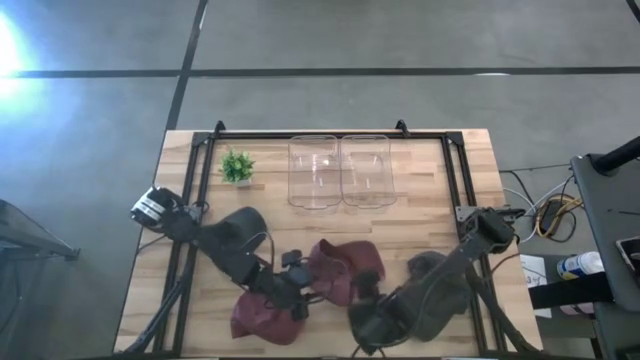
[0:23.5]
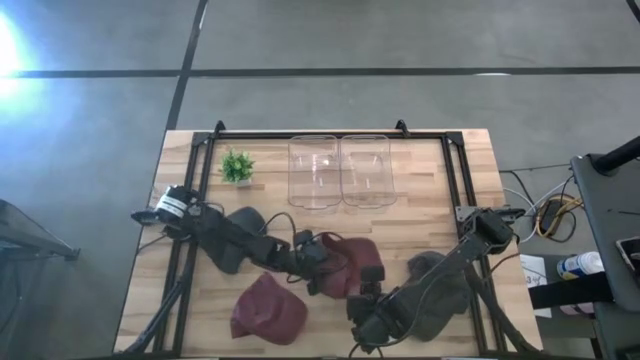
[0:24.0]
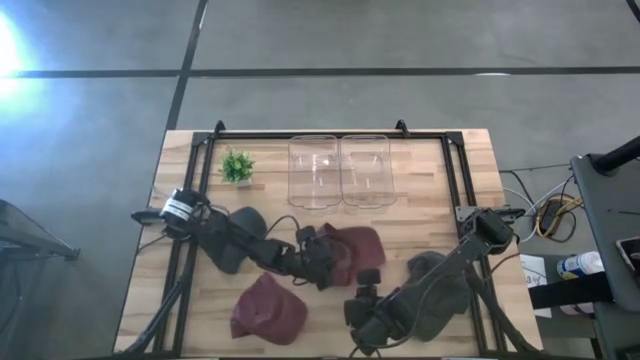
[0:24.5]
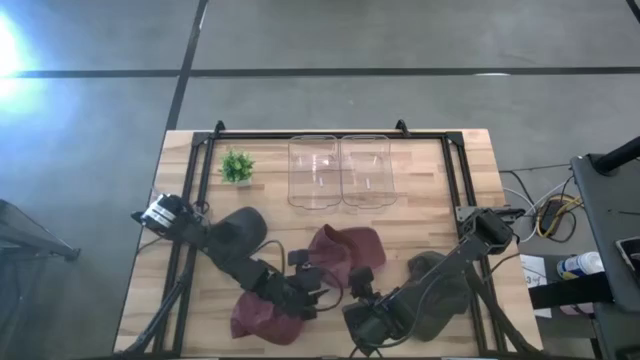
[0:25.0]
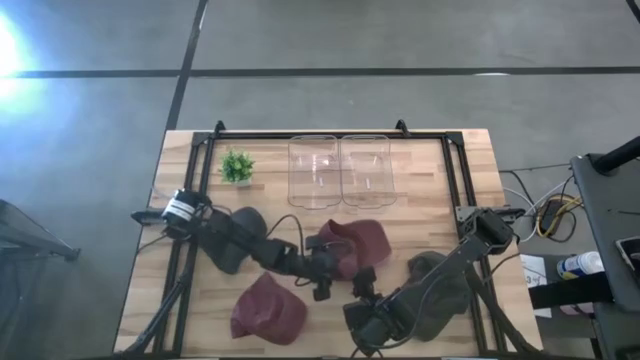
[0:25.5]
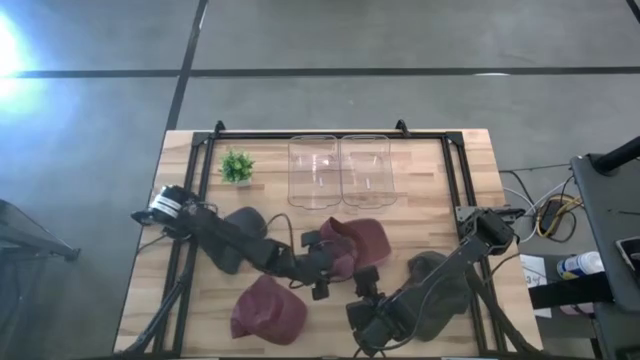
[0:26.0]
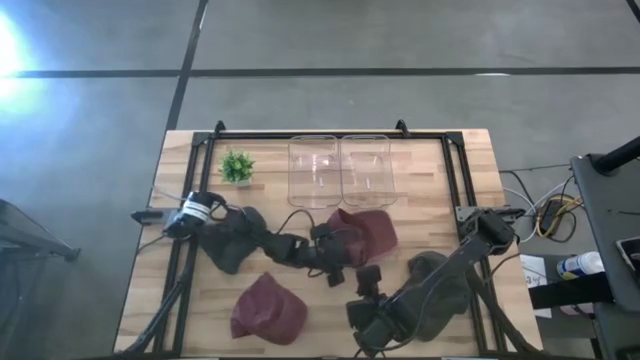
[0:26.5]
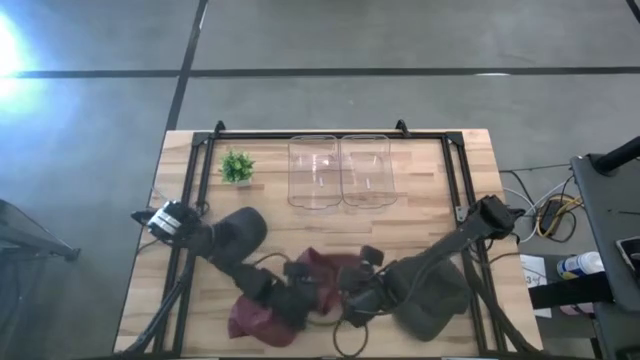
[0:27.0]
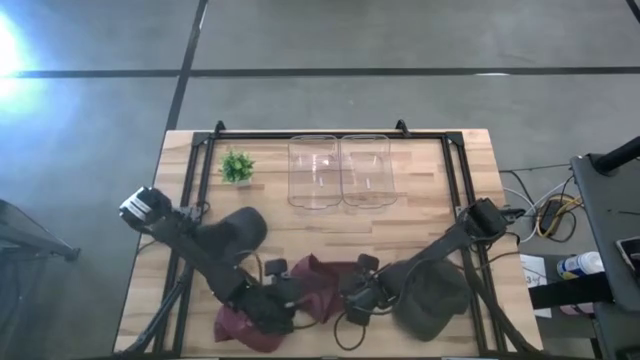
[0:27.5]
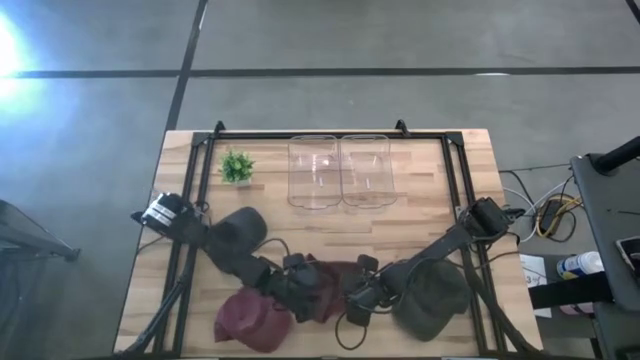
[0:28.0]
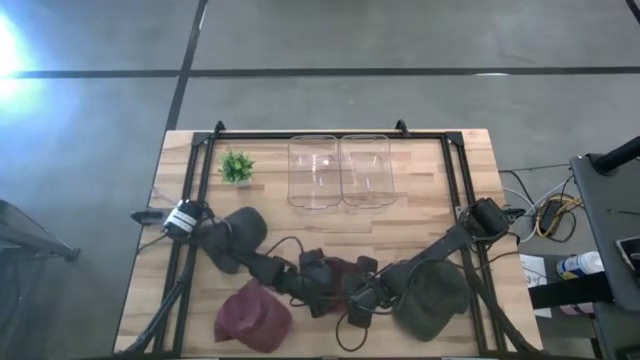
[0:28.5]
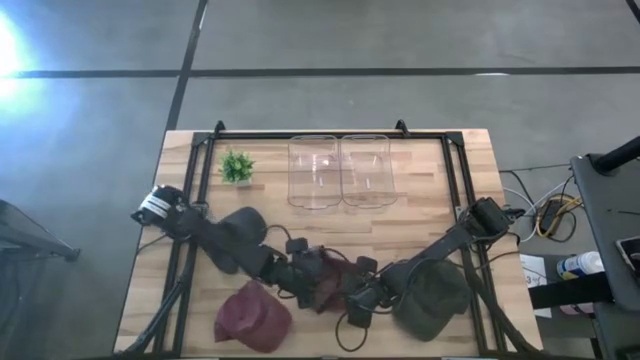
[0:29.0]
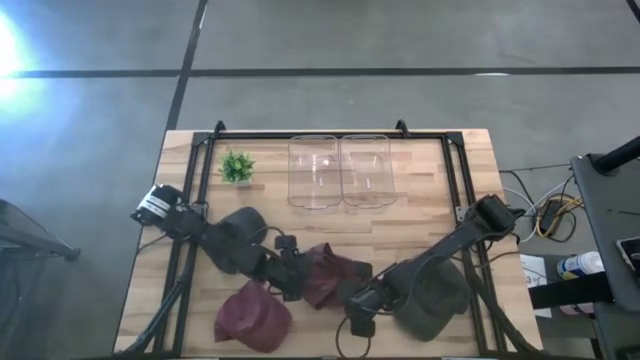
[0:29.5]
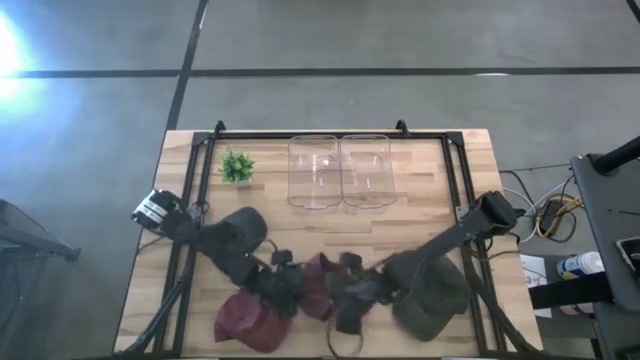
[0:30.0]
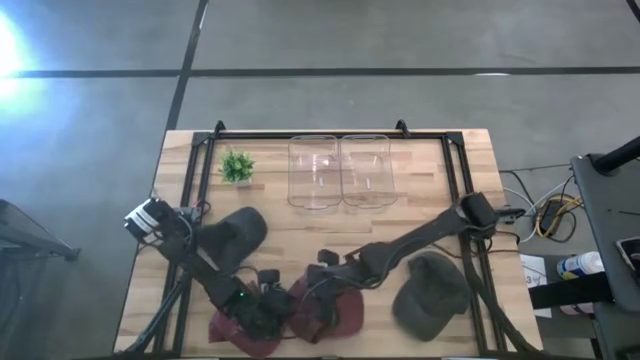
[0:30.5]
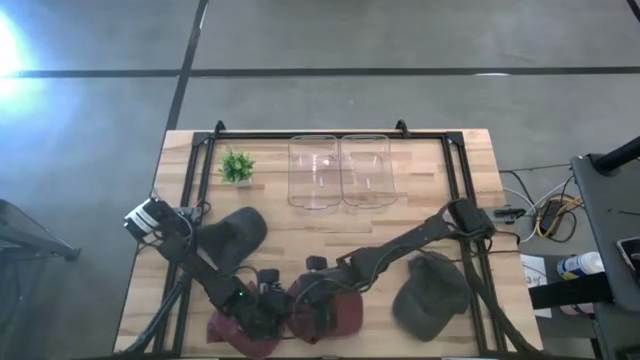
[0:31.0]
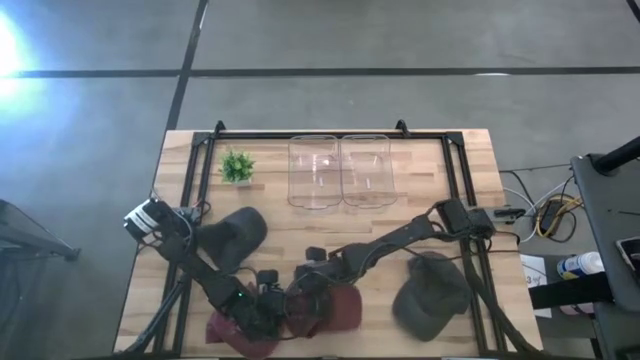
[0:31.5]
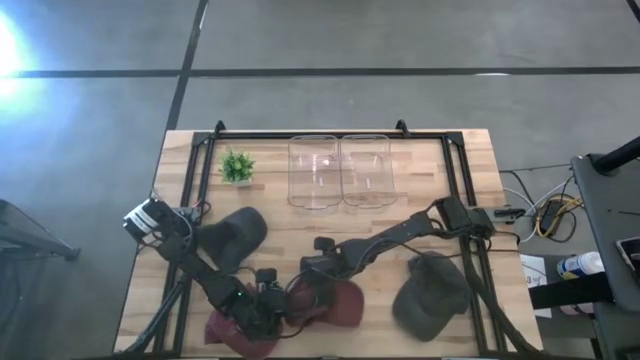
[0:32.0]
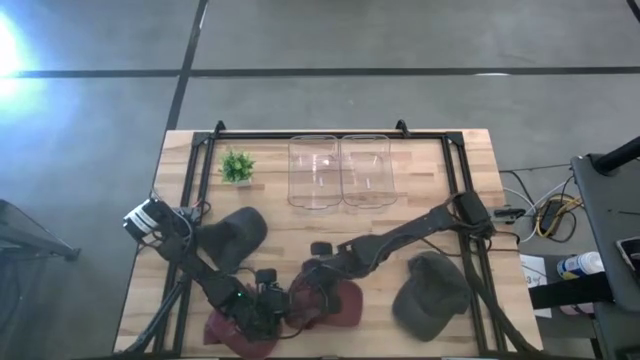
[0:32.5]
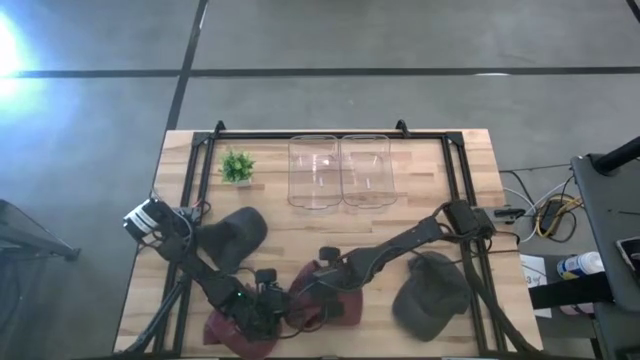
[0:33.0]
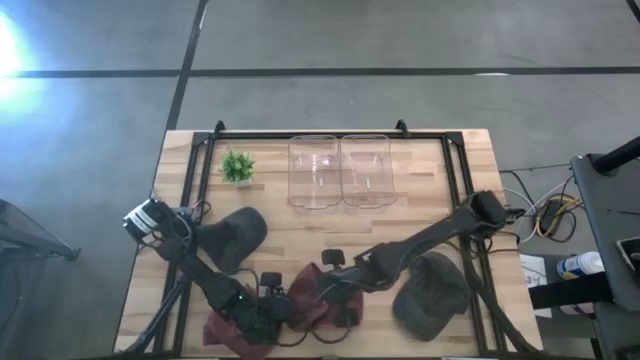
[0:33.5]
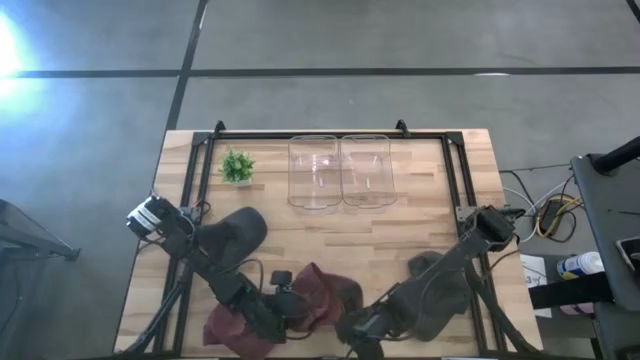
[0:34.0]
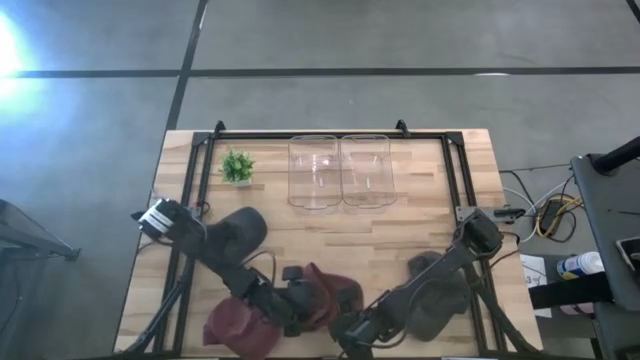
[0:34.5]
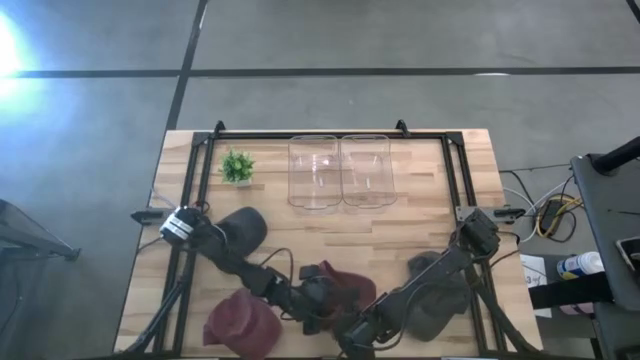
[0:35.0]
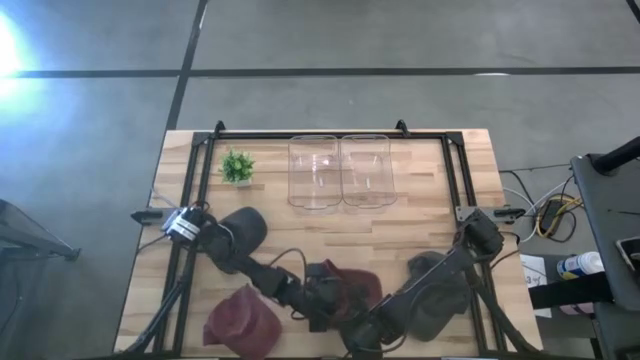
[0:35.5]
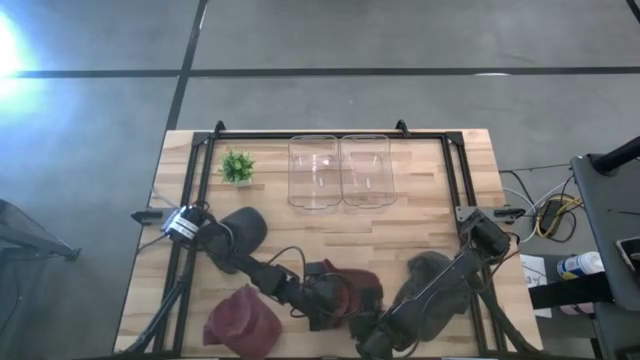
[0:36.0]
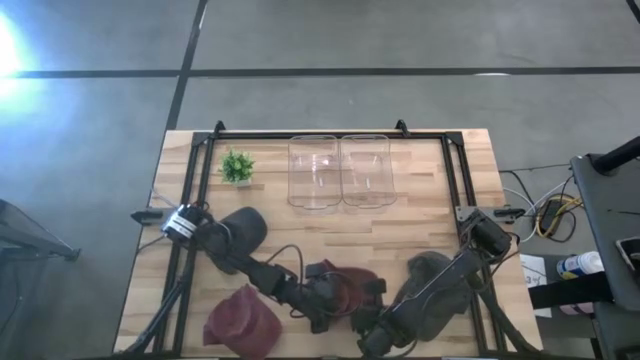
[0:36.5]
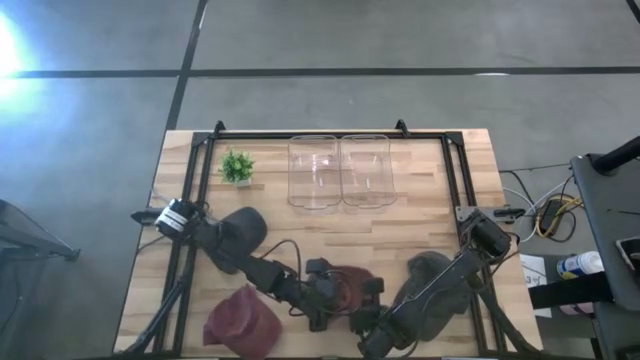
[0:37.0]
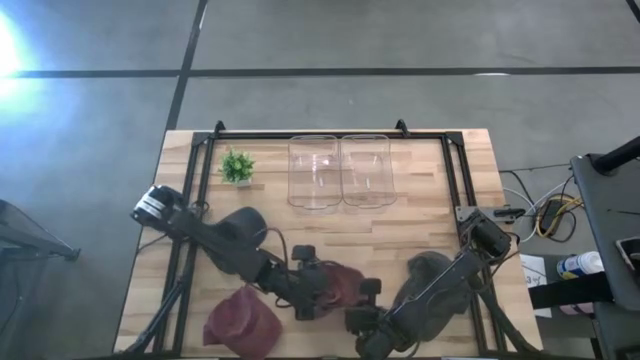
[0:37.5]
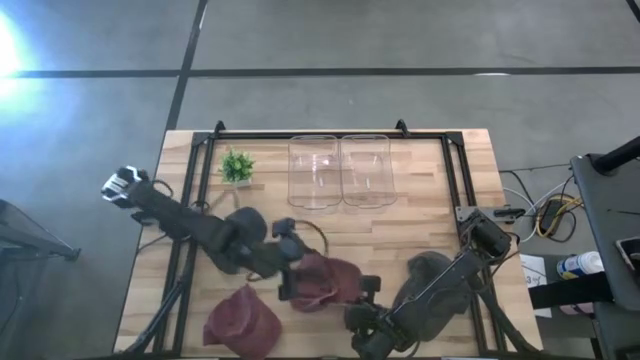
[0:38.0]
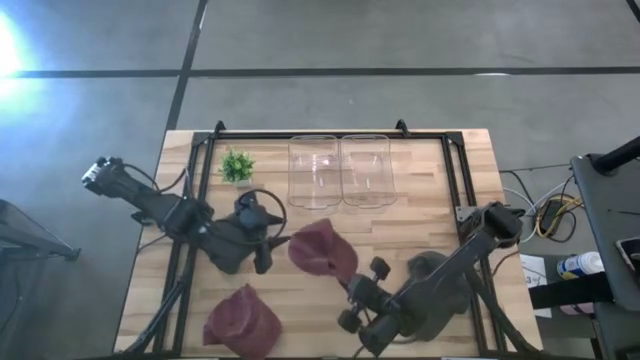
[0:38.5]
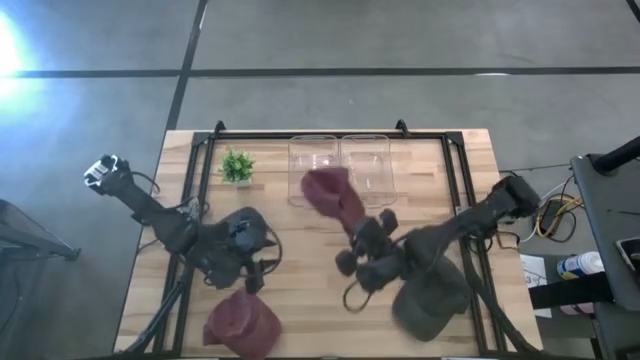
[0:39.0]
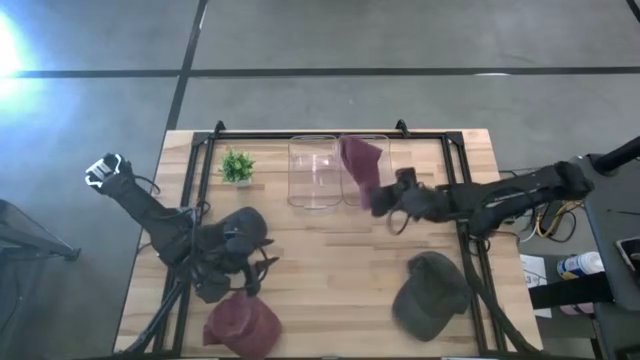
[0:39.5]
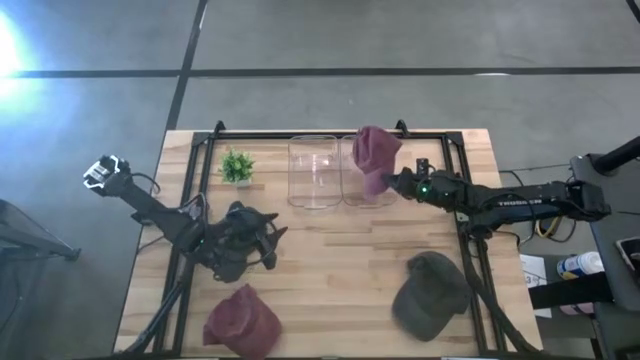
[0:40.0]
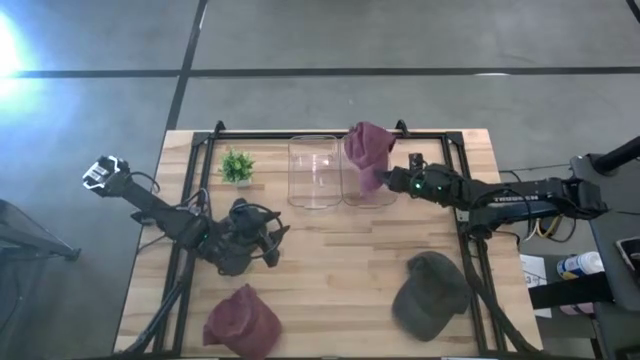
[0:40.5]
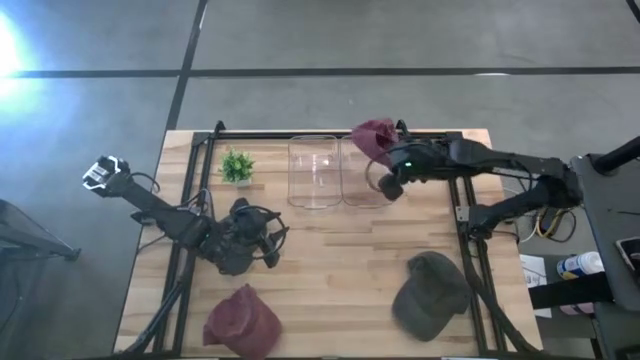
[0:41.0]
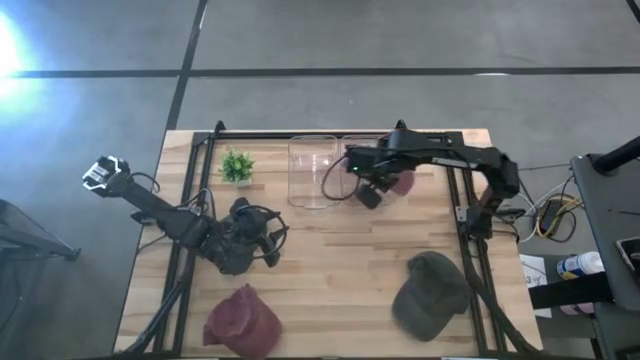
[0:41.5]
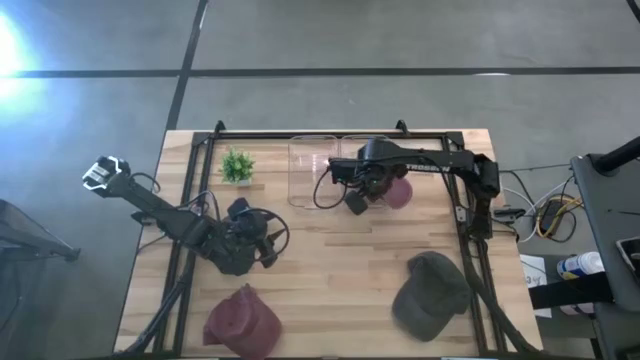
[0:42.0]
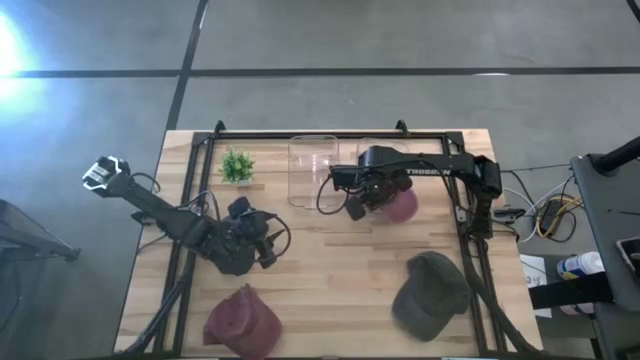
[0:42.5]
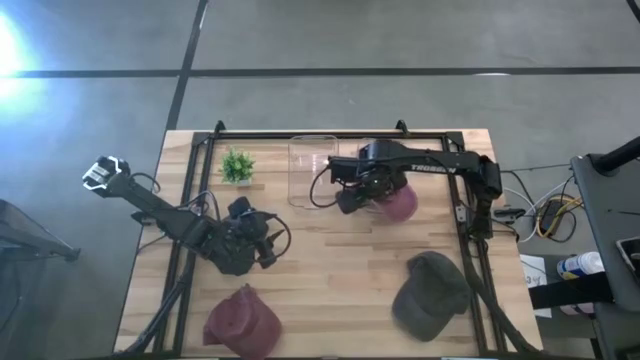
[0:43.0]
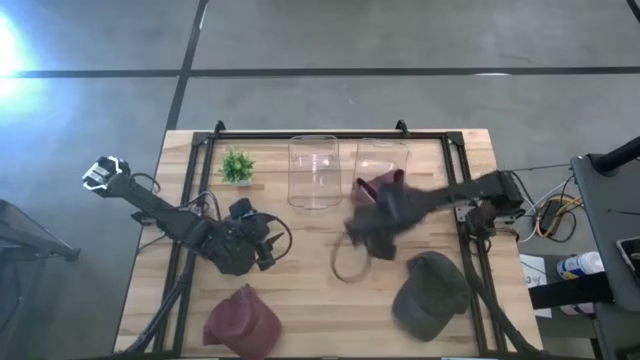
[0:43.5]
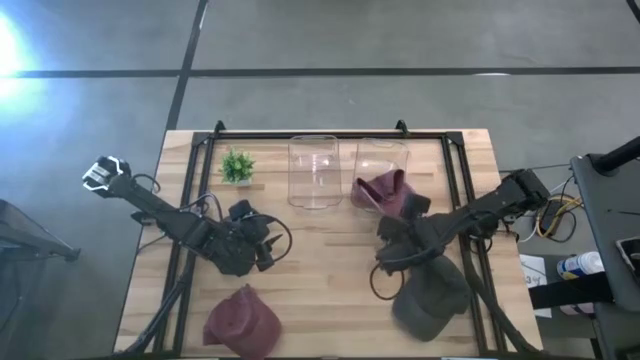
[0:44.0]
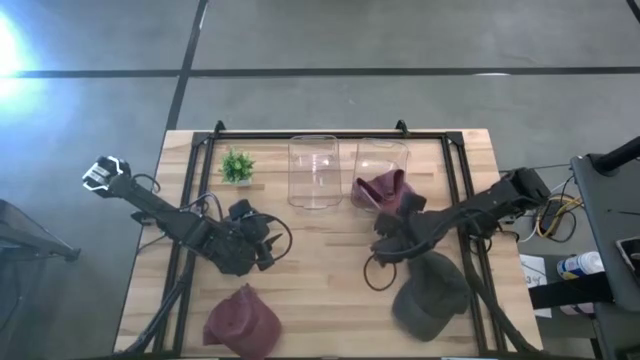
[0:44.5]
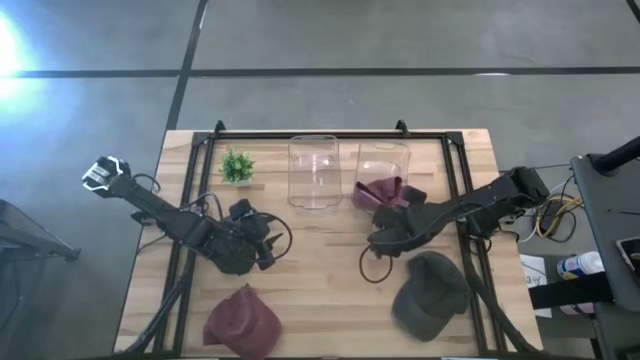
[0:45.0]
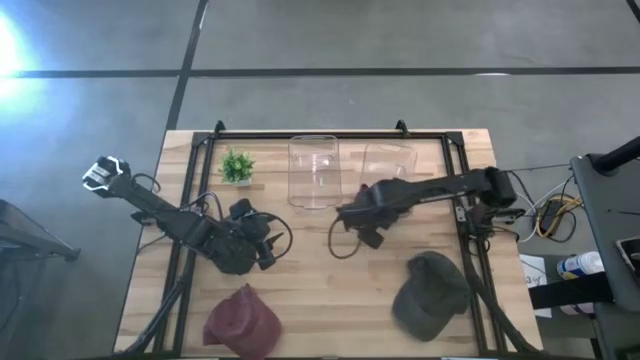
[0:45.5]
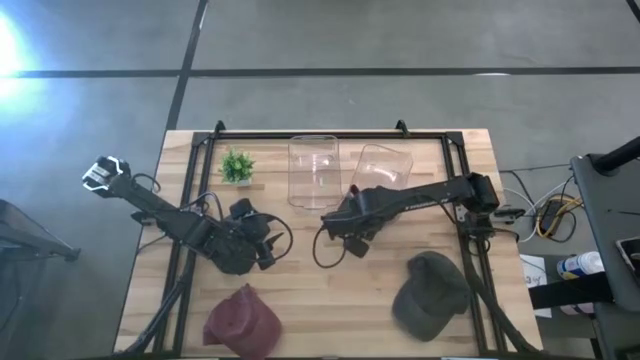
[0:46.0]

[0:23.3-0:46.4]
Task: Pick & Place hat
Put the right red cap into the right transparent bin
